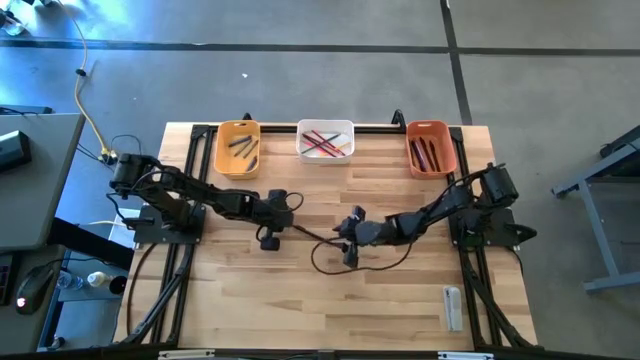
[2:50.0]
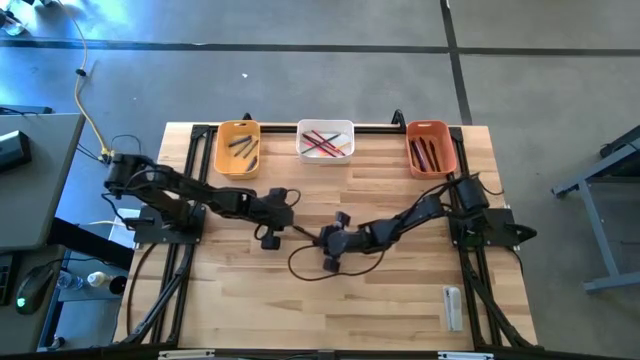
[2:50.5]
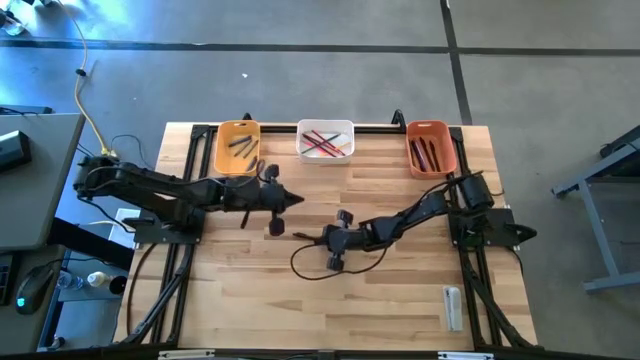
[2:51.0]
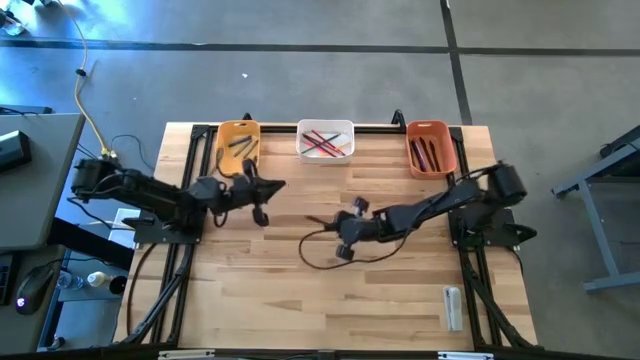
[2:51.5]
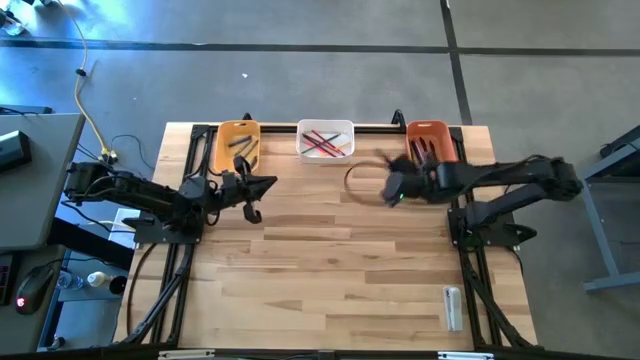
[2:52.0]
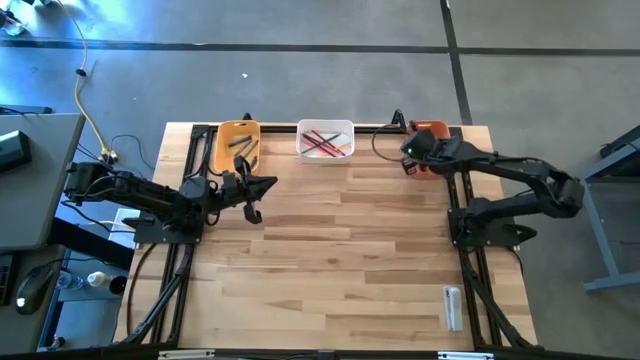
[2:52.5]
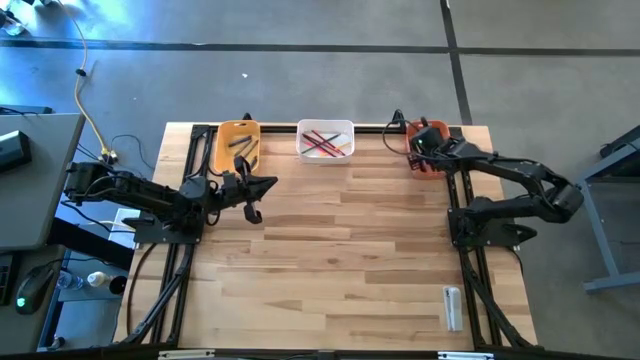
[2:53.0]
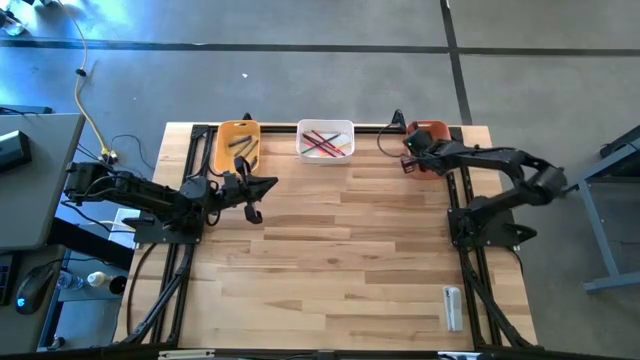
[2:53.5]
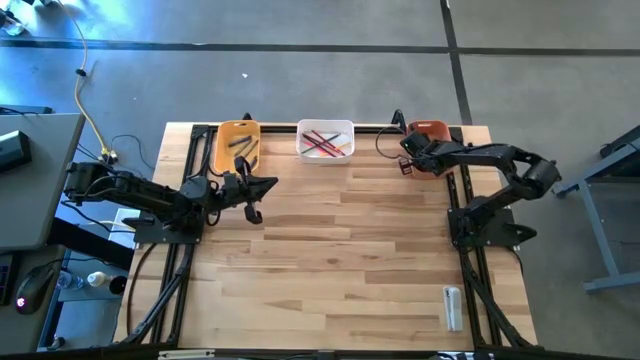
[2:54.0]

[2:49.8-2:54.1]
Task: Sort crayons/erasers/pens/pencils in bins
Put the black pen into the orange bin

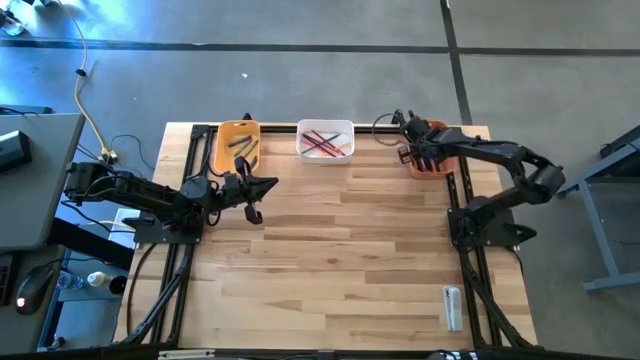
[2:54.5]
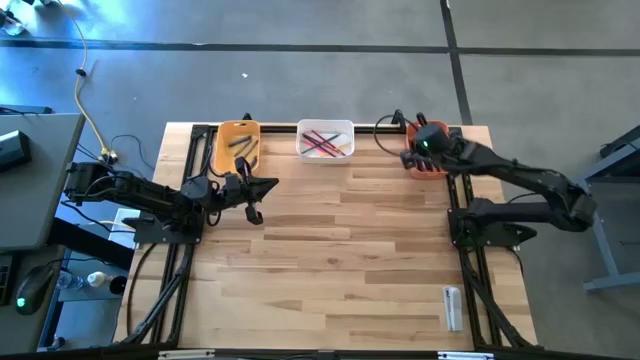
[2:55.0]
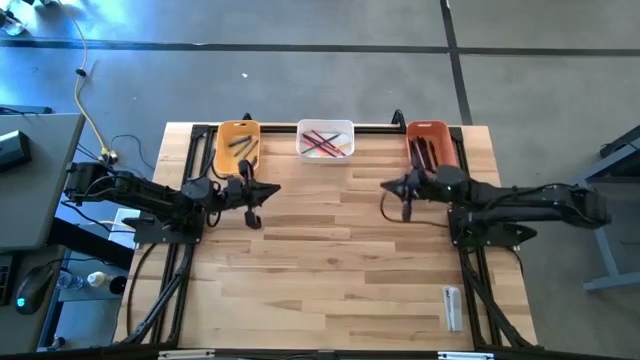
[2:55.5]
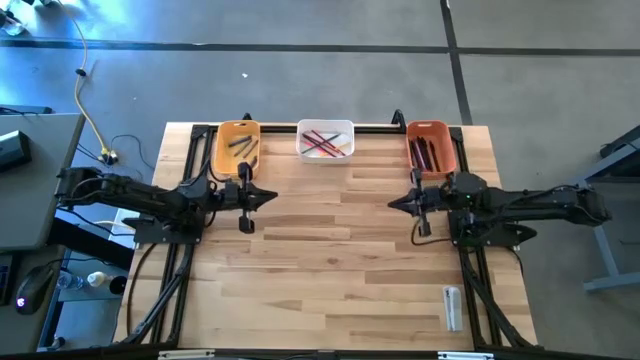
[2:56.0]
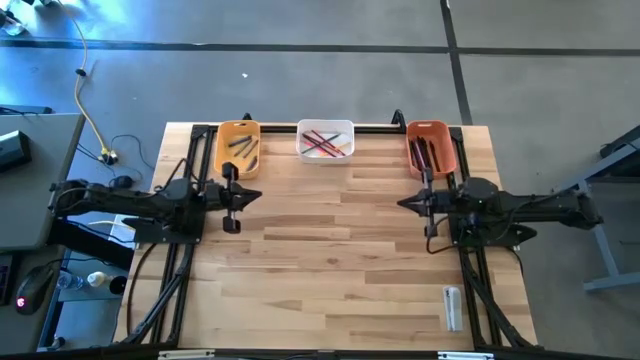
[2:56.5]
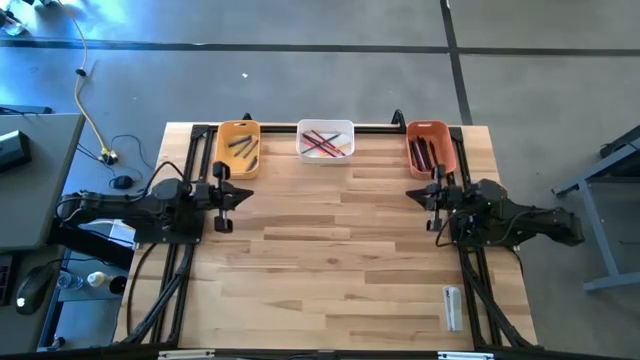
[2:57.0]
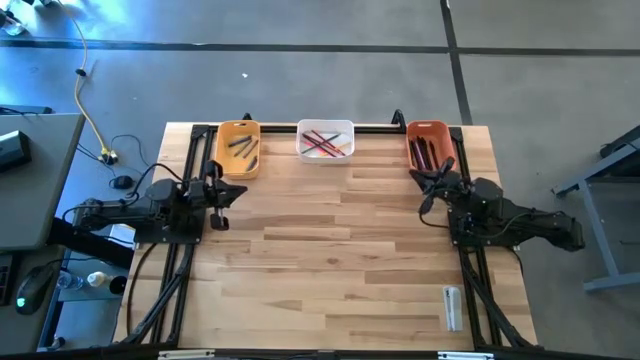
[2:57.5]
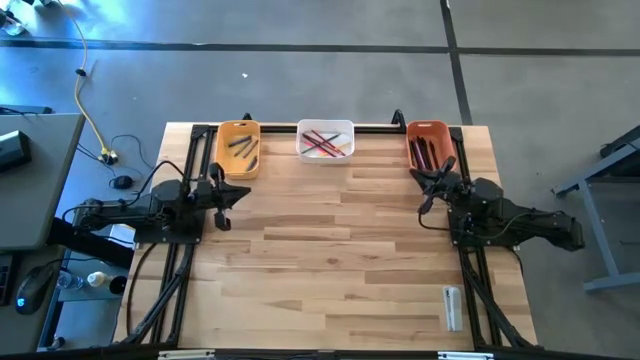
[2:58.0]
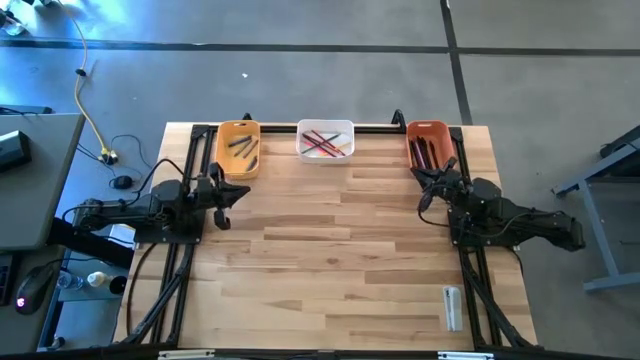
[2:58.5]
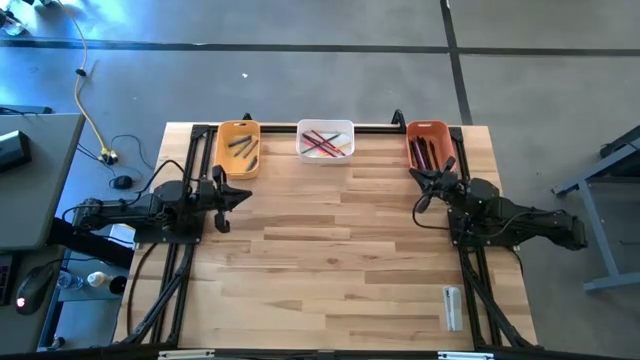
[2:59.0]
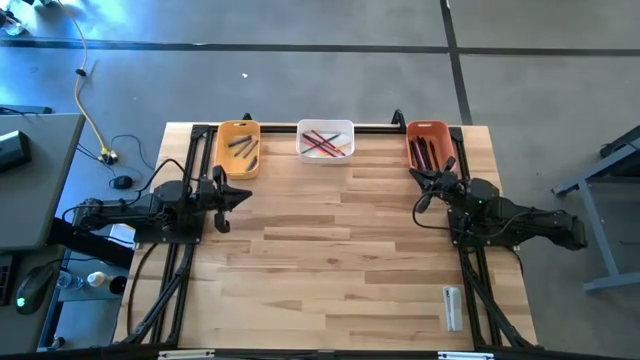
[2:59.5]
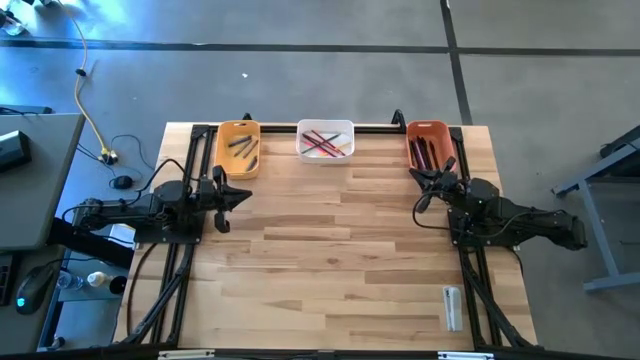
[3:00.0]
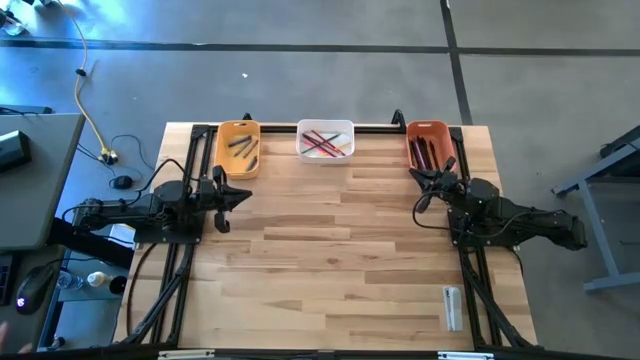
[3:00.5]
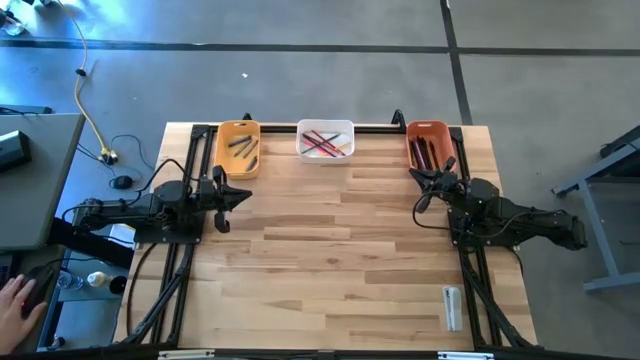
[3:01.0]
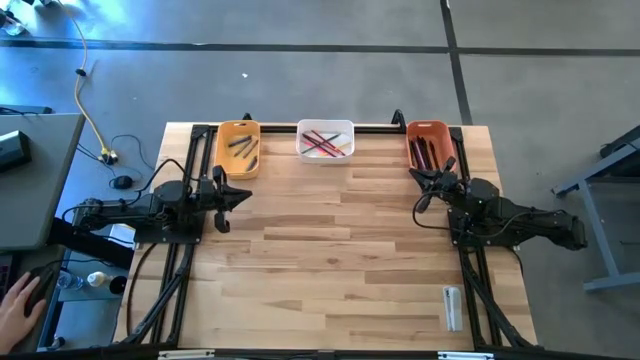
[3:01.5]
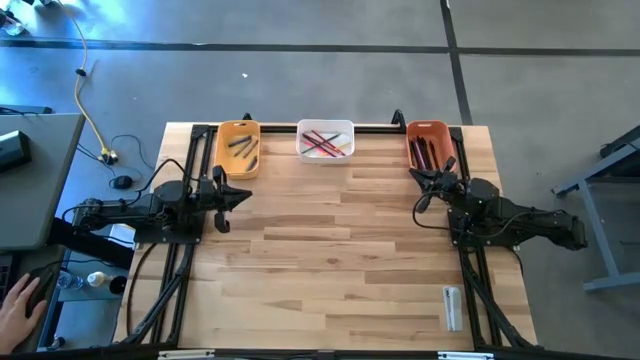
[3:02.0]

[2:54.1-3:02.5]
Return to Home Position

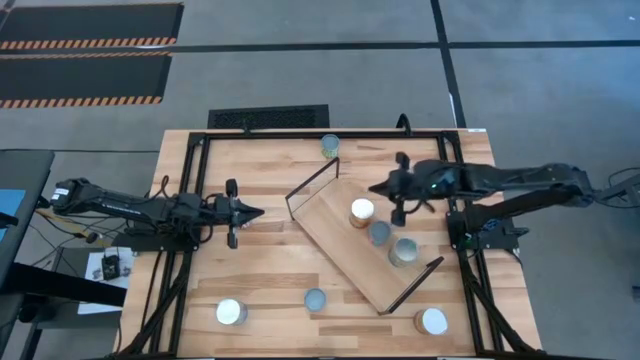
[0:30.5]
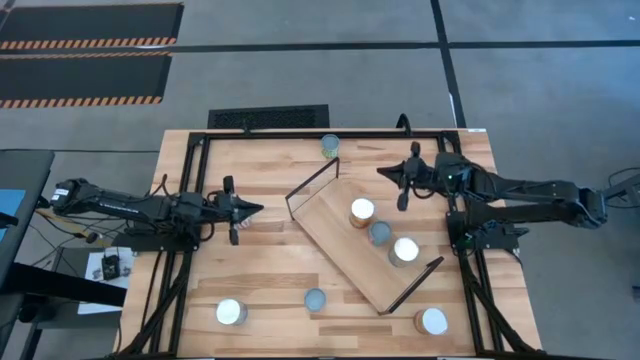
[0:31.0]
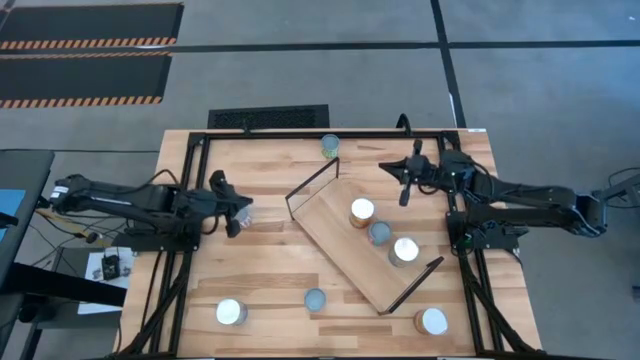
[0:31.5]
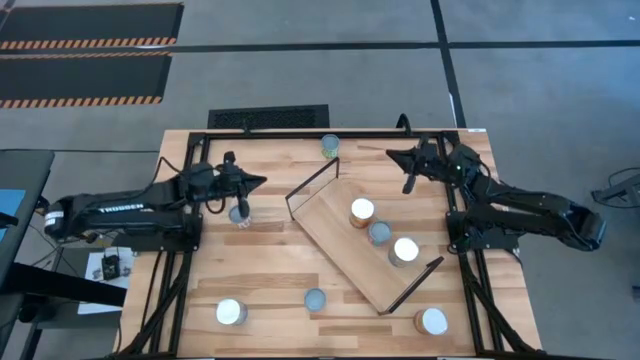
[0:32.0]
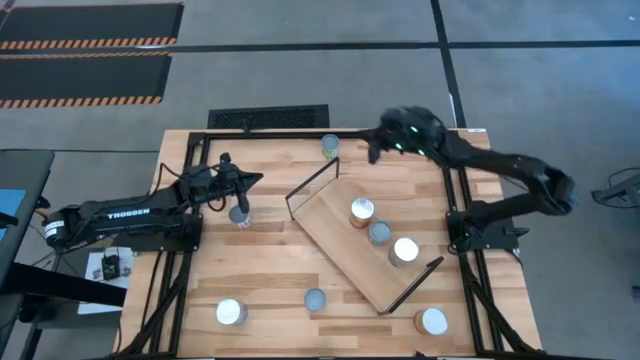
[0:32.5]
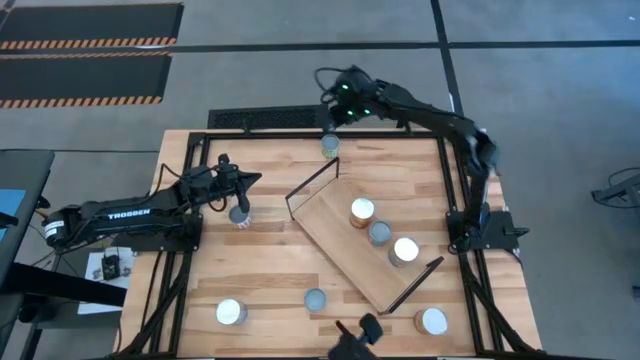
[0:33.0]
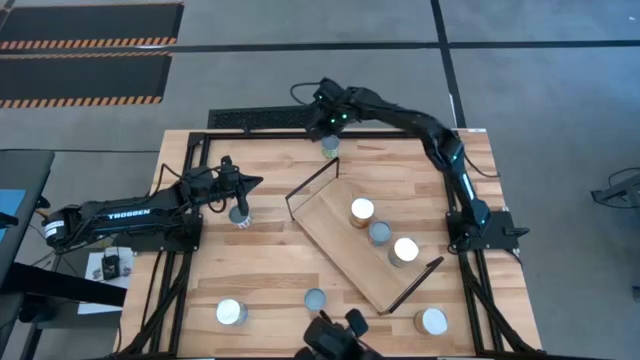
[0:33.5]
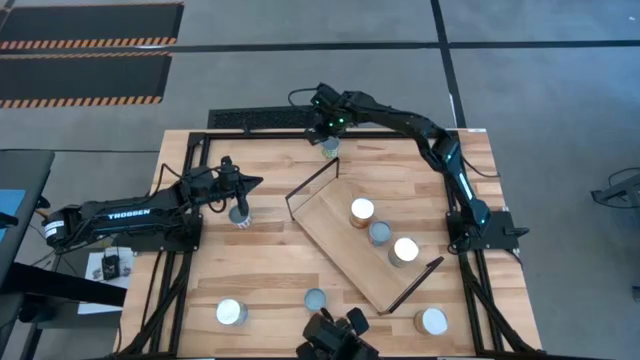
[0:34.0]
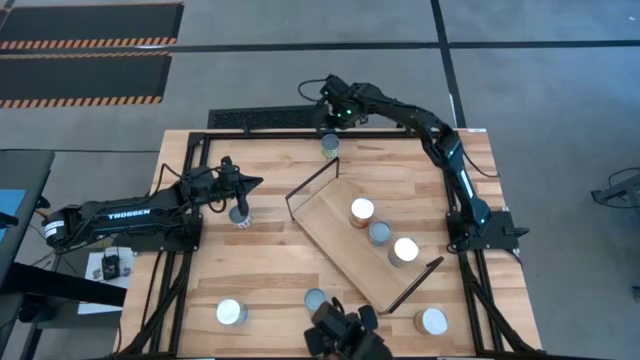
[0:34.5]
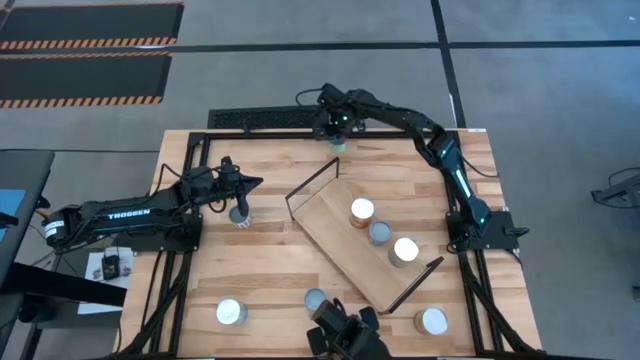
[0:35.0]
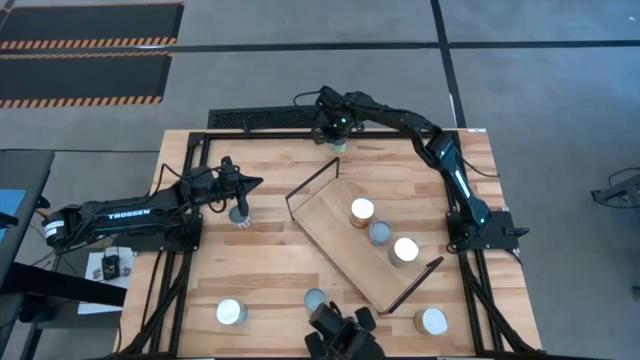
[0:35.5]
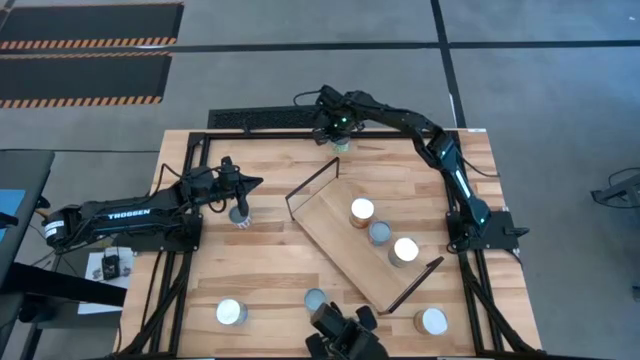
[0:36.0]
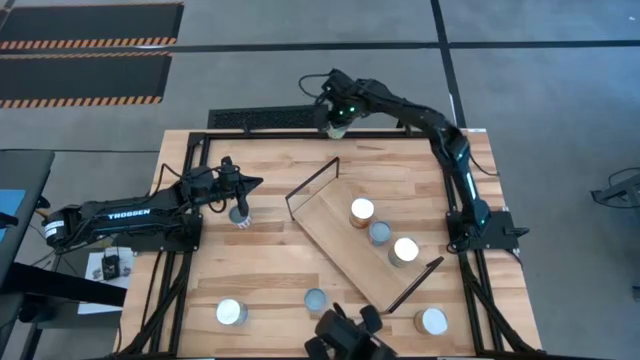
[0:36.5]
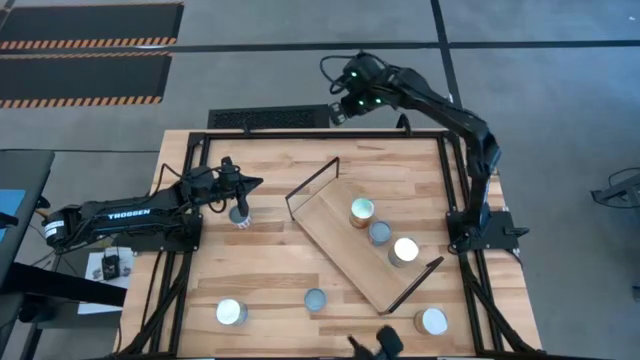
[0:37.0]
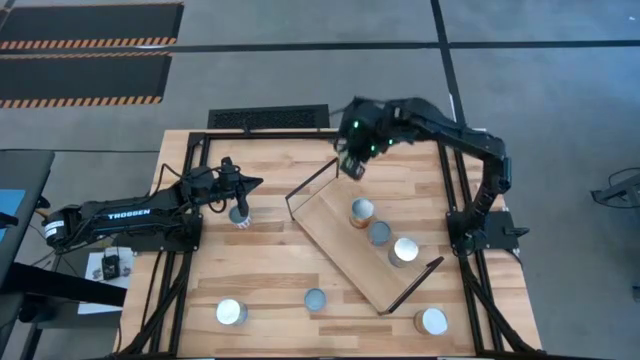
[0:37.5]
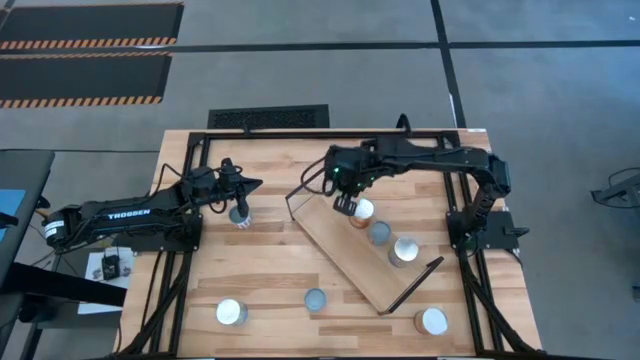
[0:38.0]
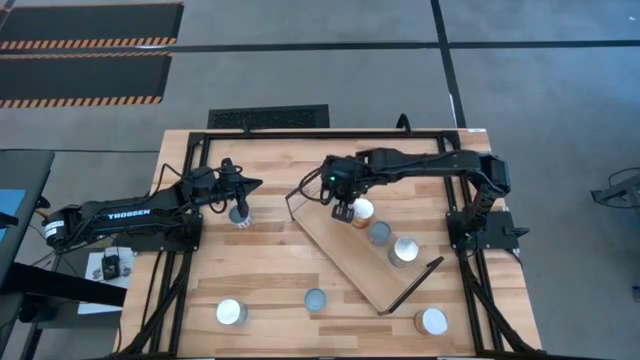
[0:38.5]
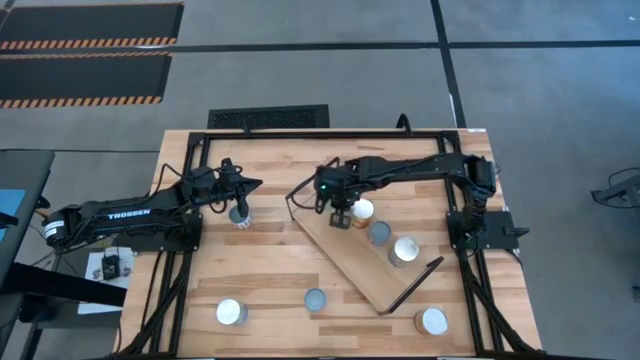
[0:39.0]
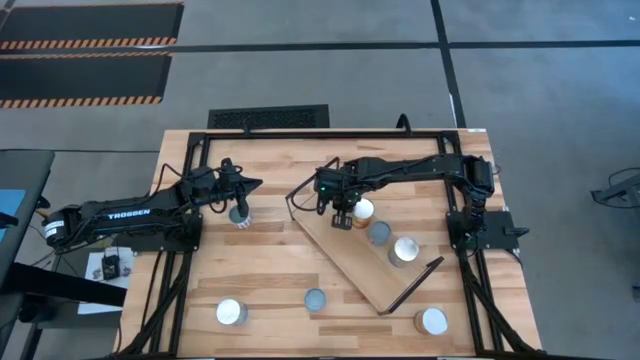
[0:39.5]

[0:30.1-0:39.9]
Task: Pick and place cans onto a shelf
Put the small canned peas on the shelf
